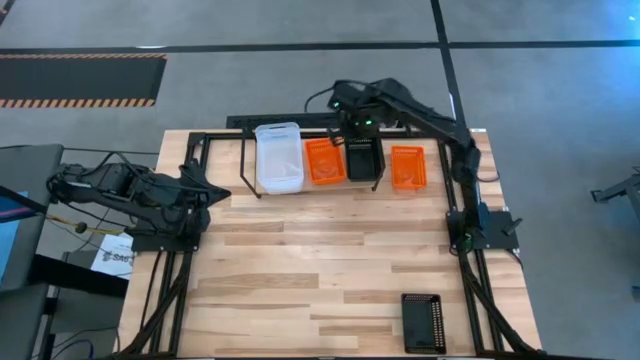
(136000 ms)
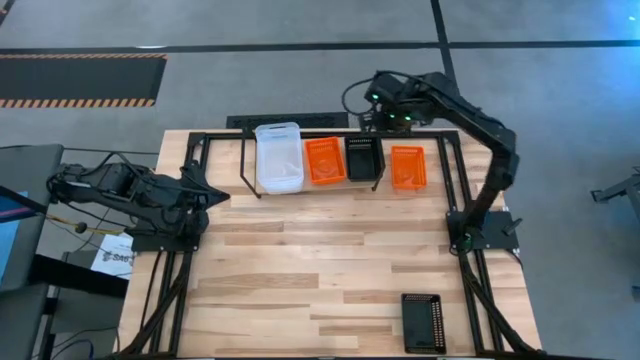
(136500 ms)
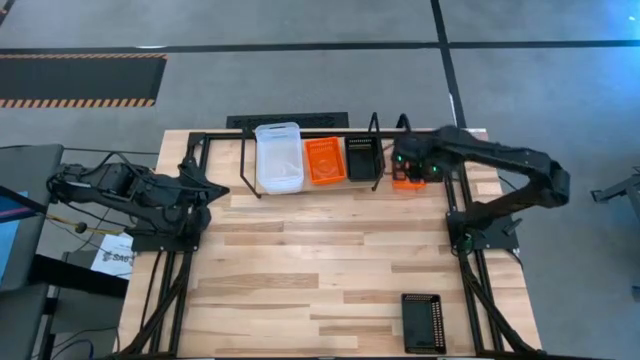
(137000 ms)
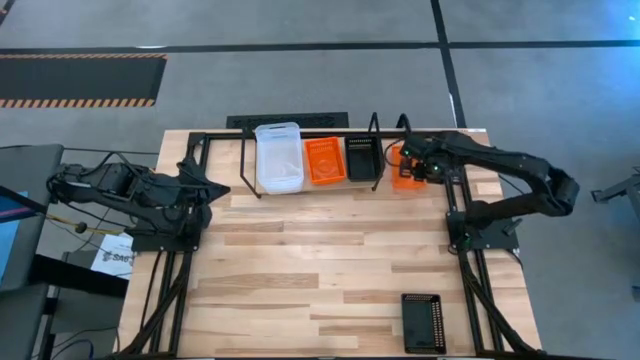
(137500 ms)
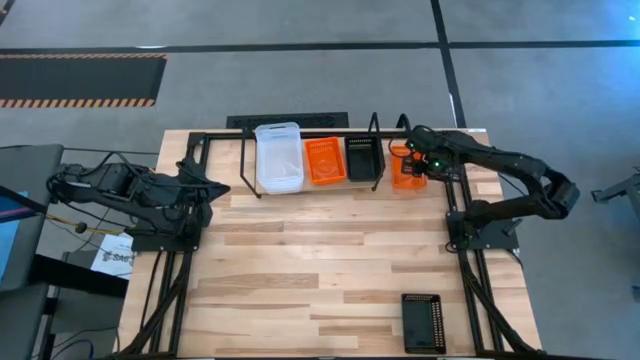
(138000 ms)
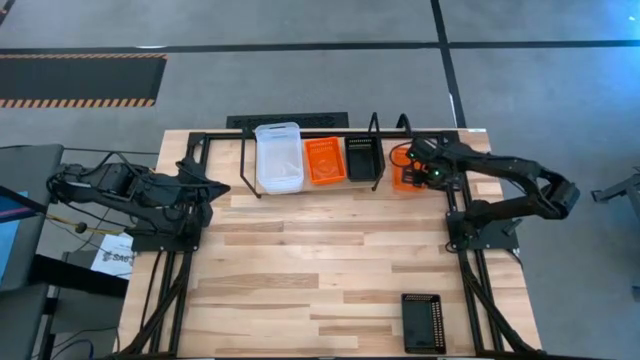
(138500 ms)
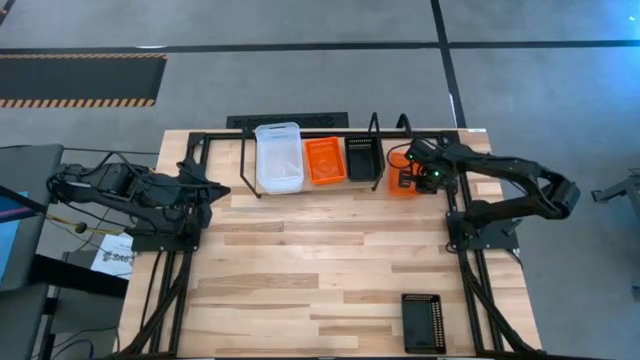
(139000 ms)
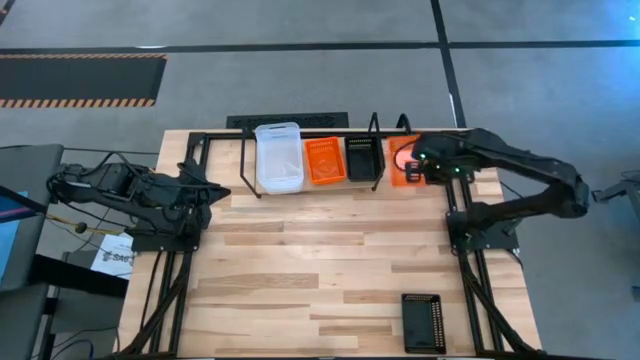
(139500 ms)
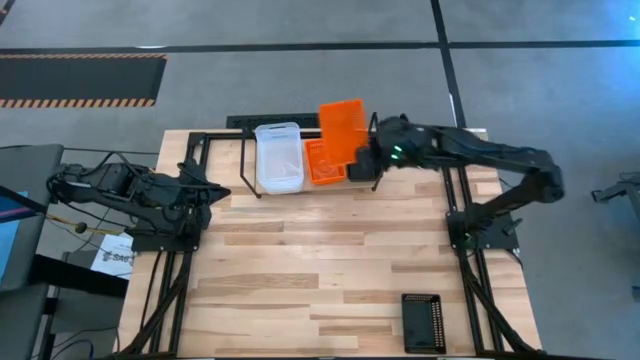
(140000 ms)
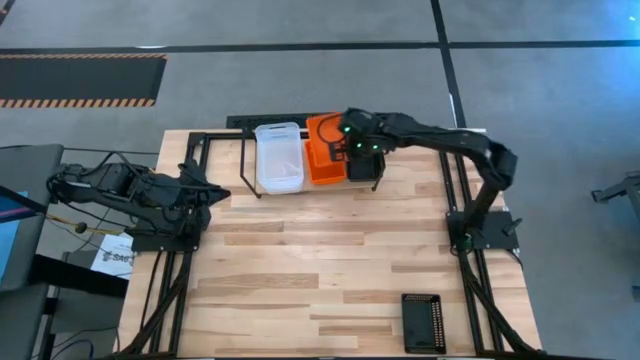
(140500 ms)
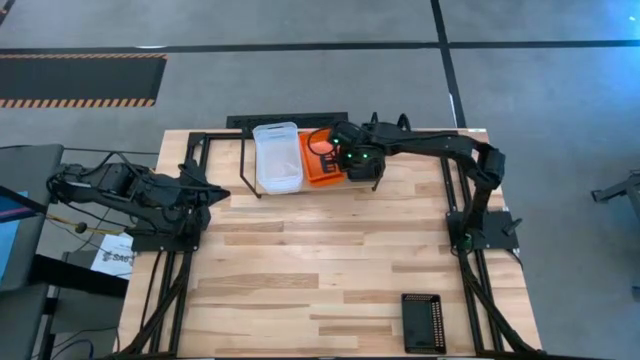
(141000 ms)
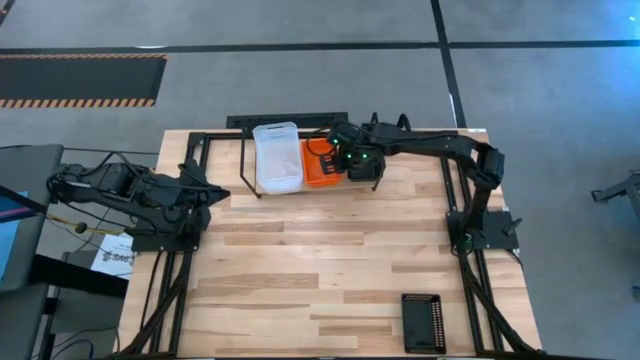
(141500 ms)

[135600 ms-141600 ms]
Task: Stack baskets on shelf by color
Stack the orange bin on top of the orange bin on the shelf

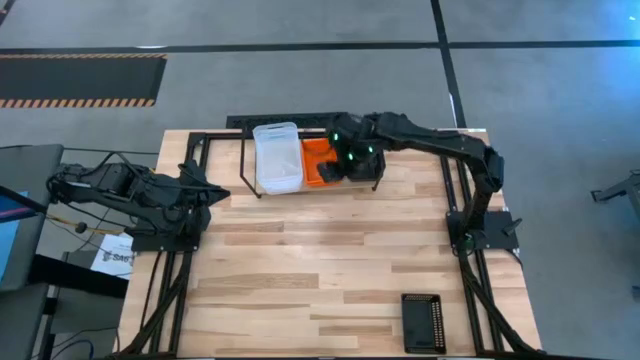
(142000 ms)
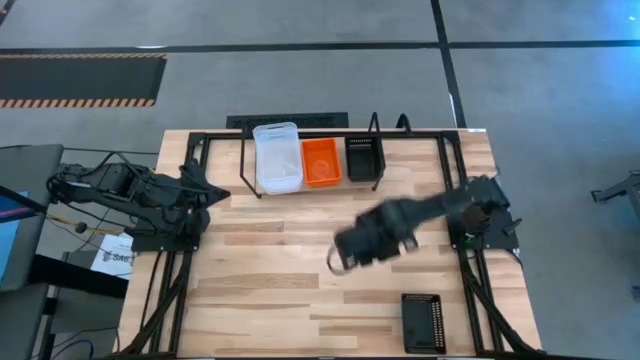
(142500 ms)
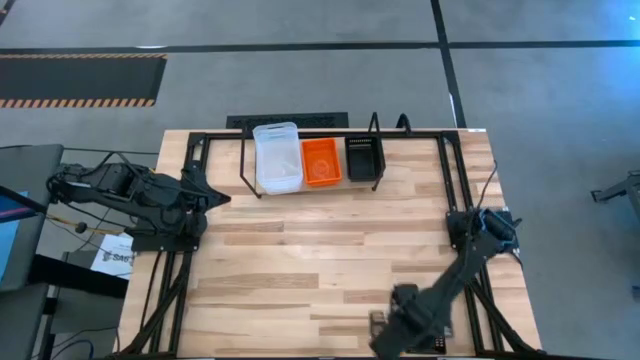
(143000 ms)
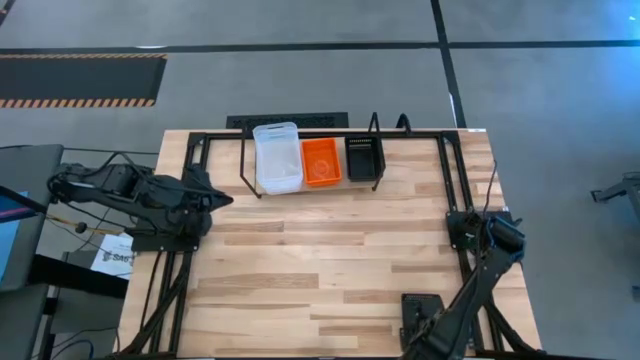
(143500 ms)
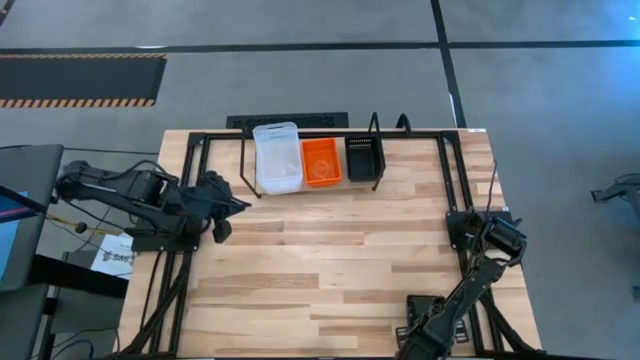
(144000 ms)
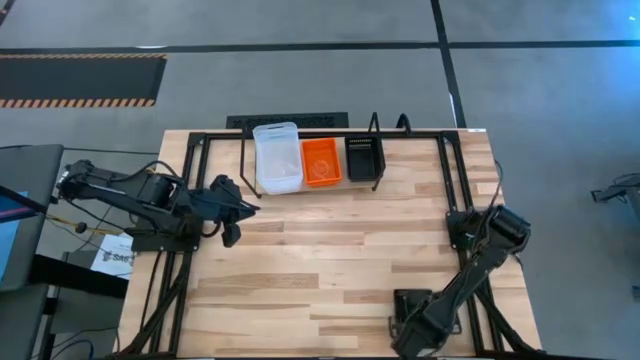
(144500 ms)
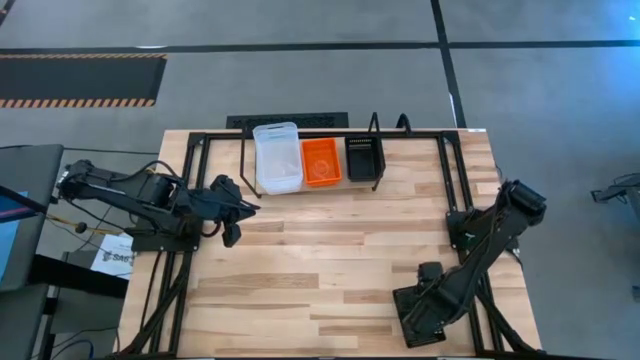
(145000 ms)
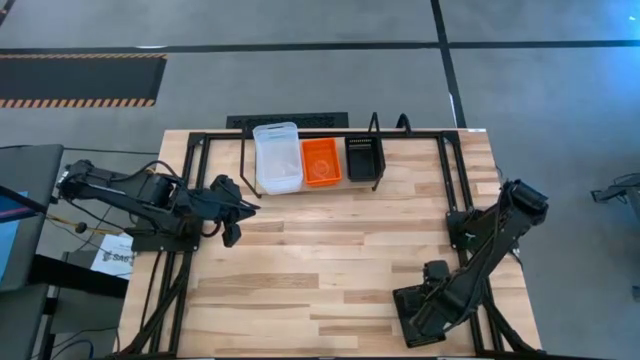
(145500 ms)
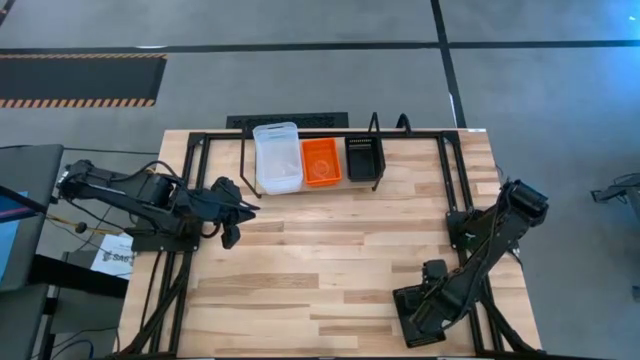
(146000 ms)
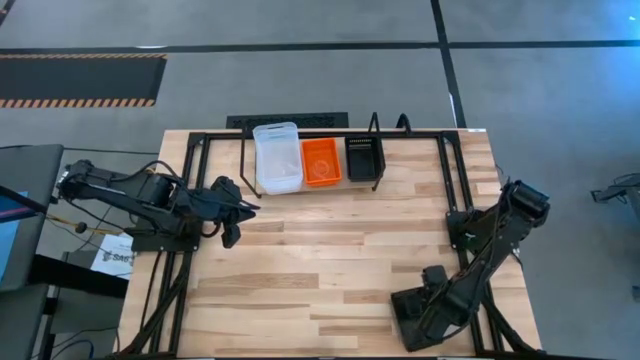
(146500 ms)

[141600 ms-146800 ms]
Stack the black bin on top of the black bin on the shelf

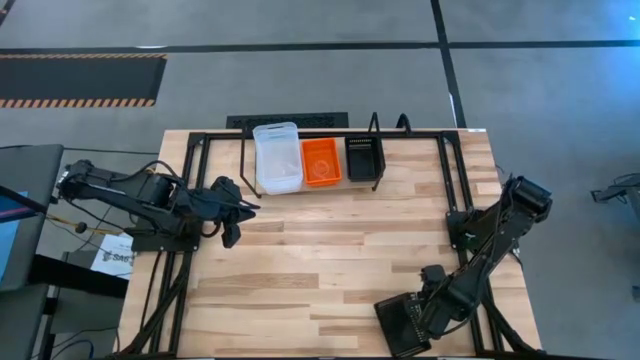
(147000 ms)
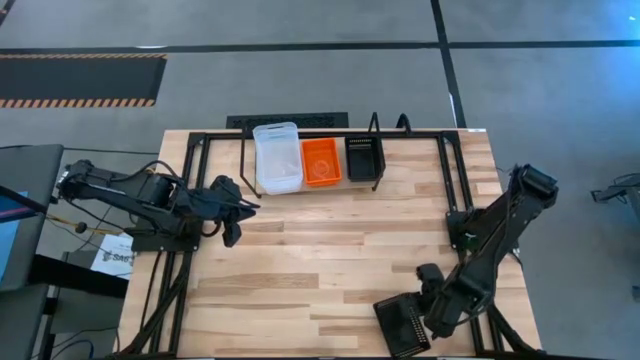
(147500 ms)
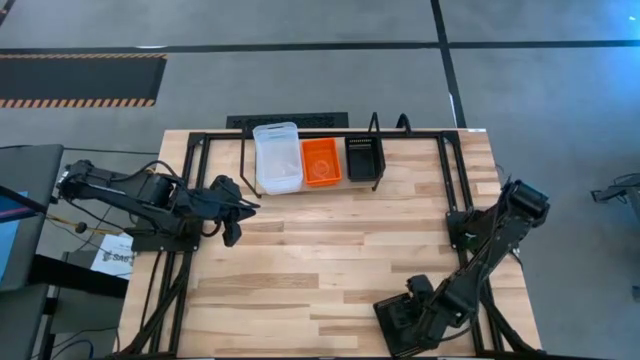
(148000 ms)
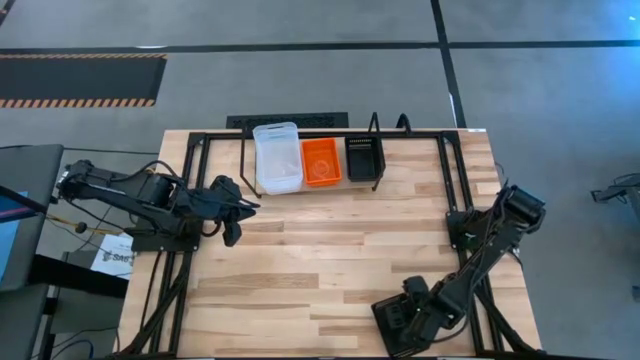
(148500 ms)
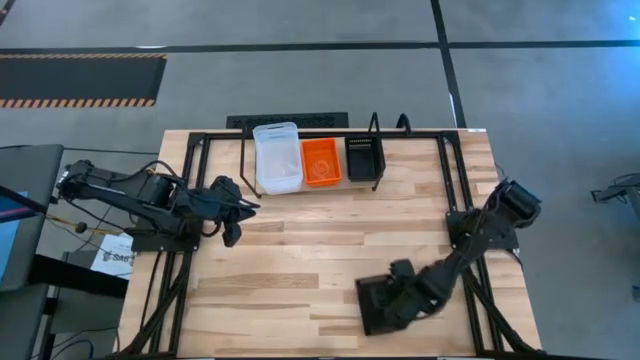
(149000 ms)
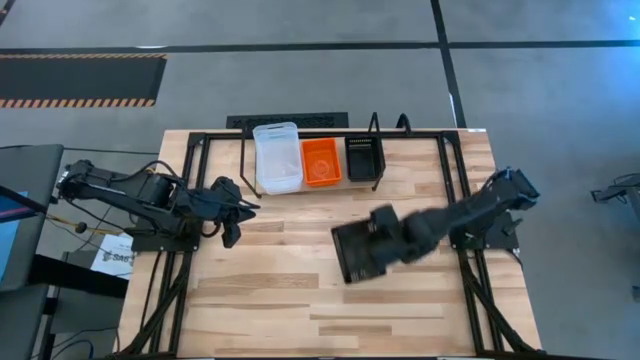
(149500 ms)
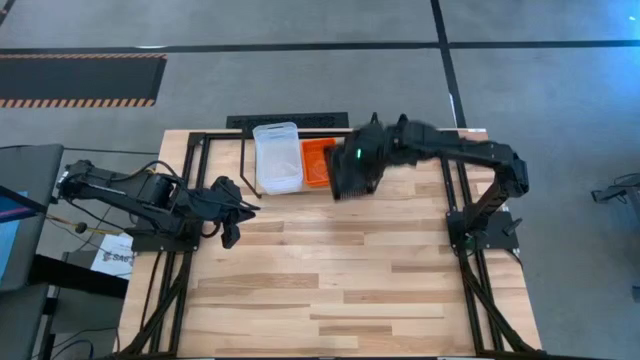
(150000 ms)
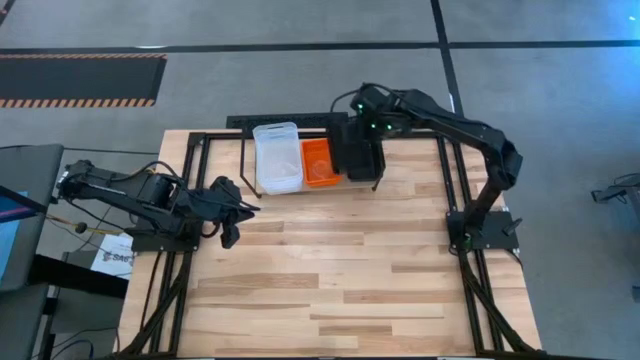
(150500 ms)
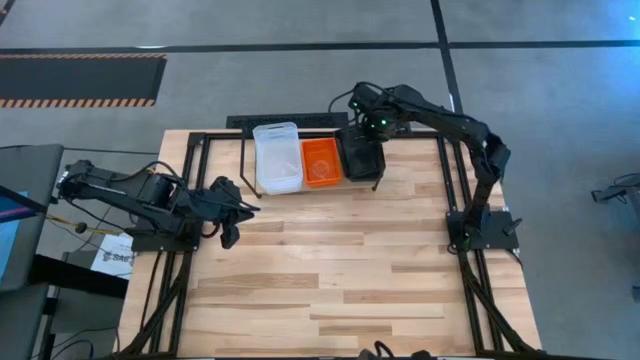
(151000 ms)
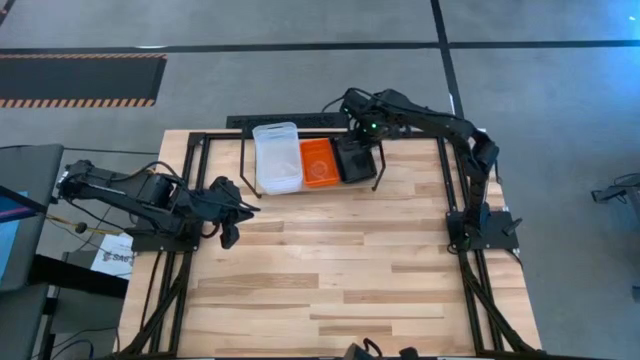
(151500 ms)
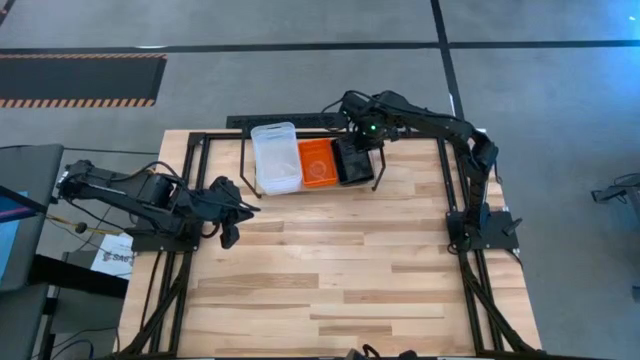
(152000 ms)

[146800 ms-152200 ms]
Stack the black bin on top of the black bin on the shelf

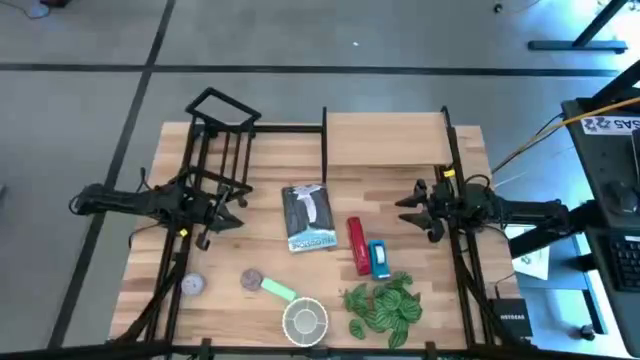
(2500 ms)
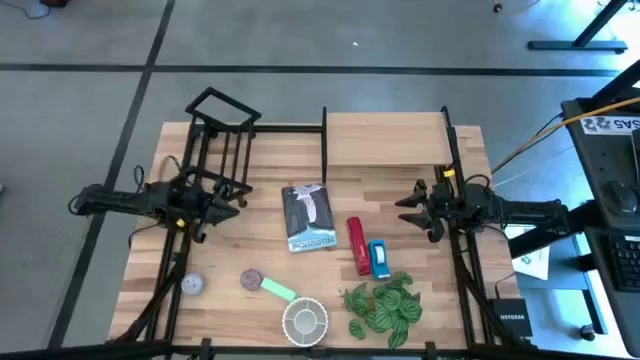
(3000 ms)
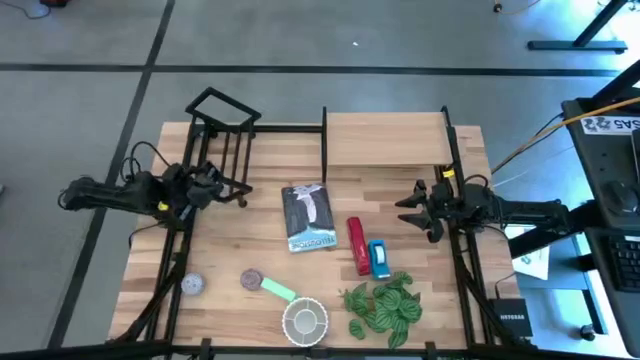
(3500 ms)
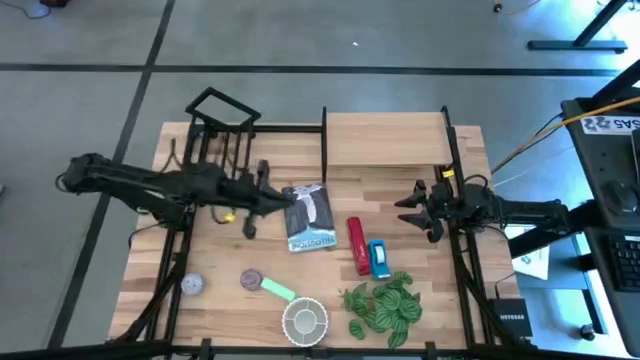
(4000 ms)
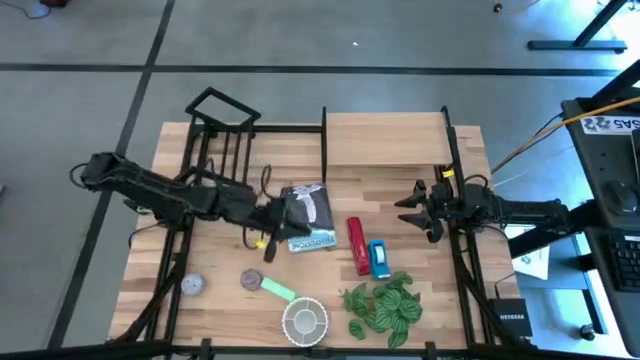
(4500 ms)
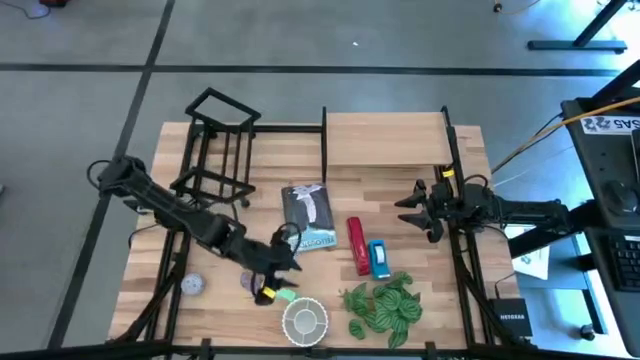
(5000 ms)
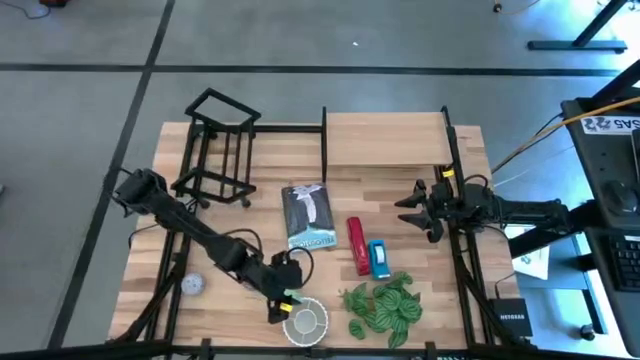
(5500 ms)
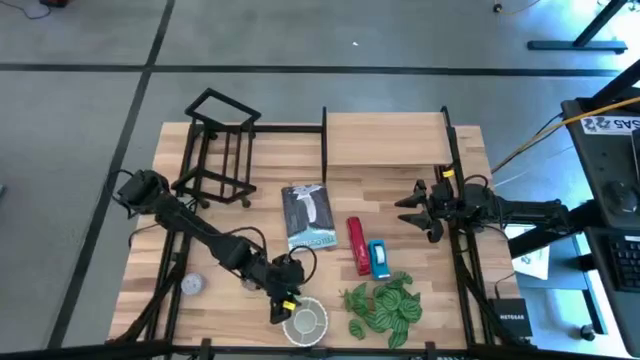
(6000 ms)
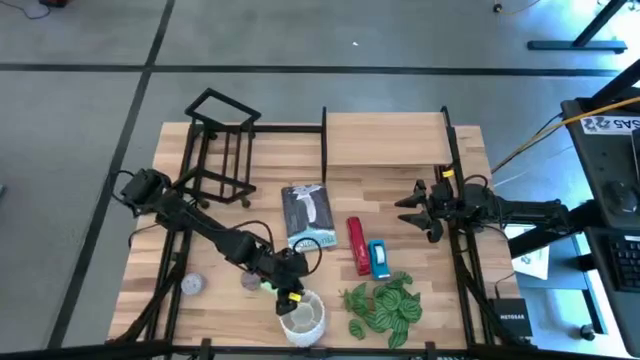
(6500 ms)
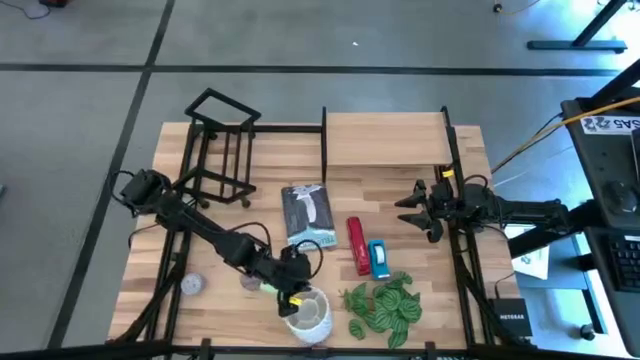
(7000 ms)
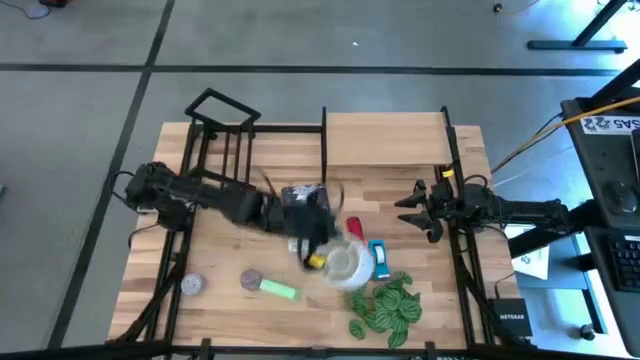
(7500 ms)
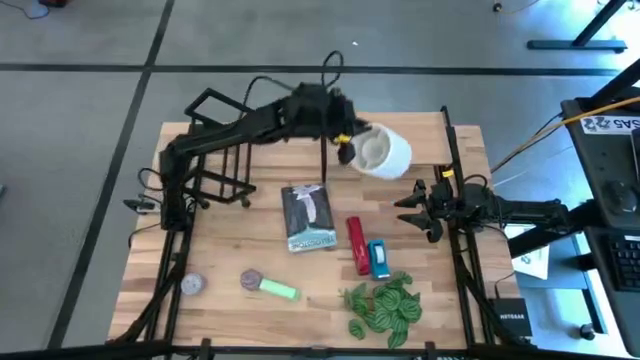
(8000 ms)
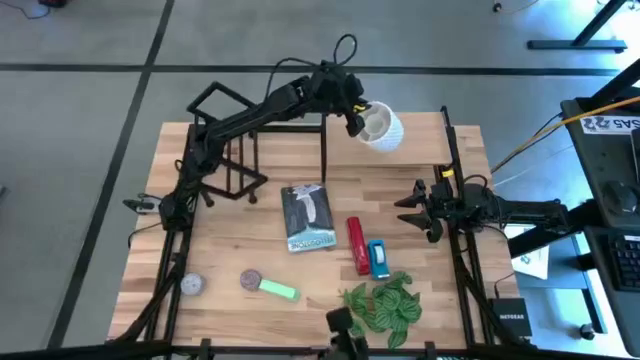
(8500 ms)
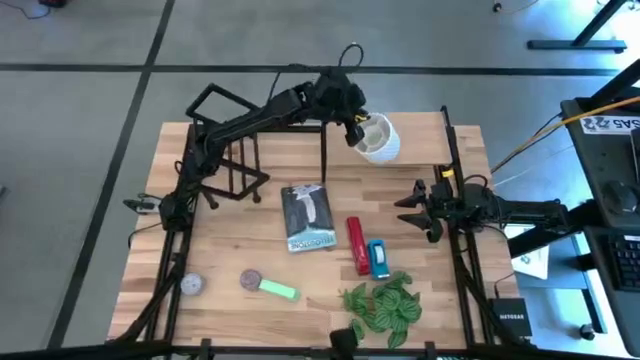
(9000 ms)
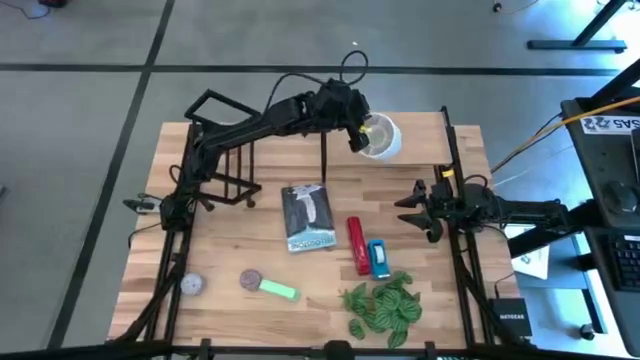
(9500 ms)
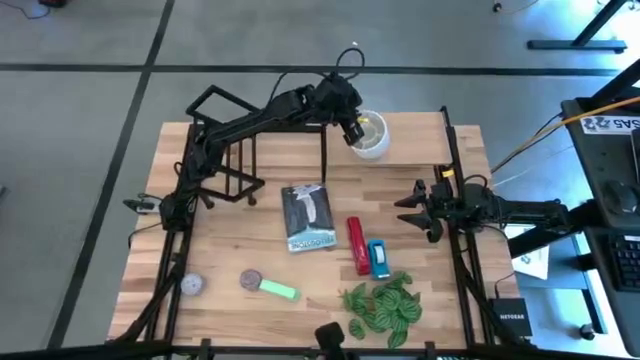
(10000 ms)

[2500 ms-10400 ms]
Task: Stock shelves
Put the white pencil holder on the shelf
